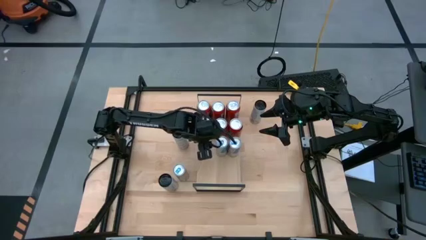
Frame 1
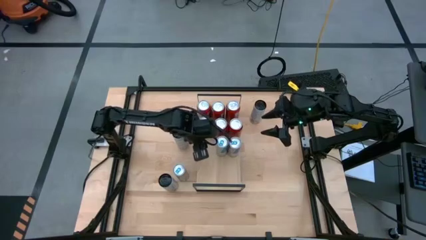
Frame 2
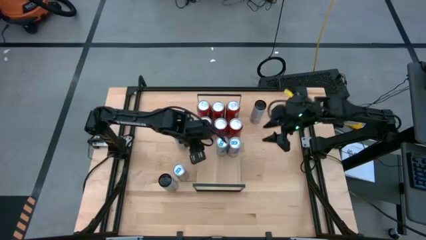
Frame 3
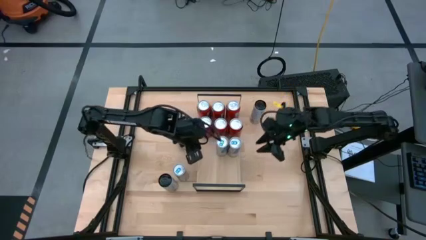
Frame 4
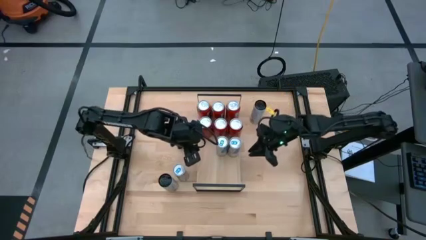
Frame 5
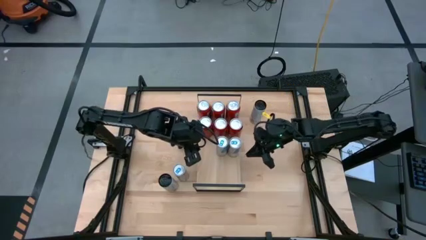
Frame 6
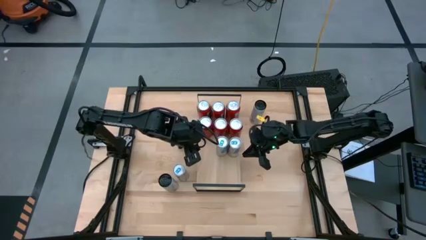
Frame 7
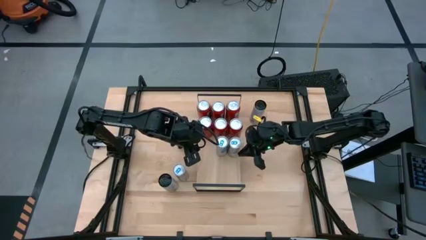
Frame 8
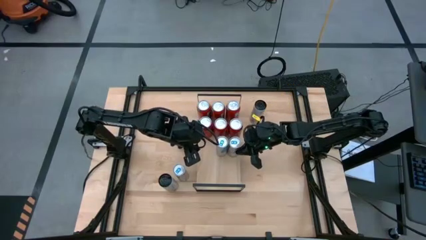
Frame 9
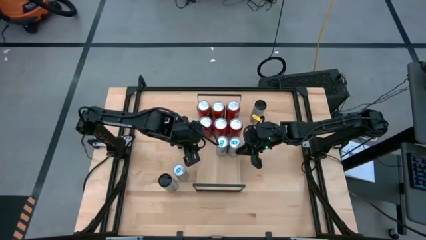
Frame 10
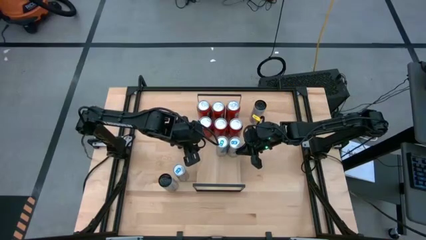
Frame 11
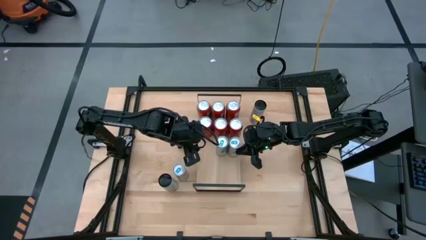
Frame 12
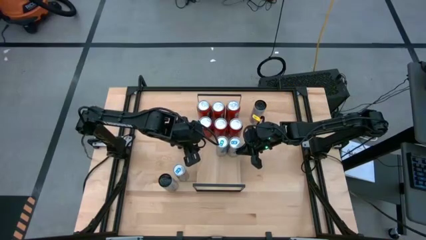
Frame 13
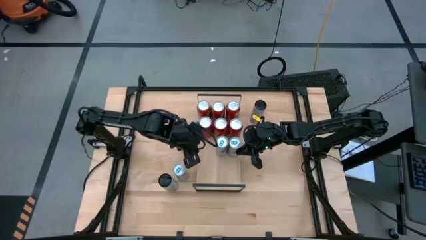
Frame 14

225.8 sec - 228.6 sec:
Task: Place canned beverage on shelf
Adjust the blue soda can on the shelf

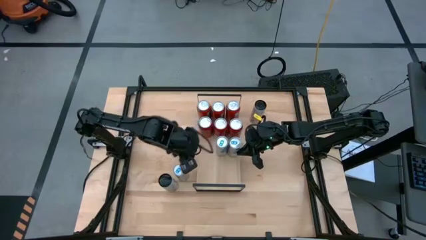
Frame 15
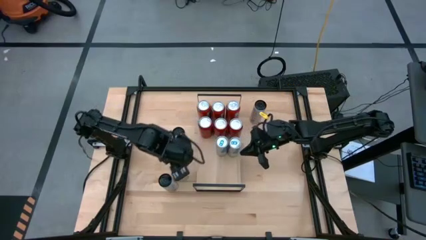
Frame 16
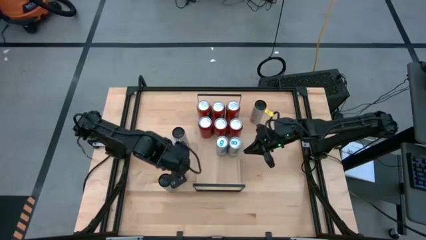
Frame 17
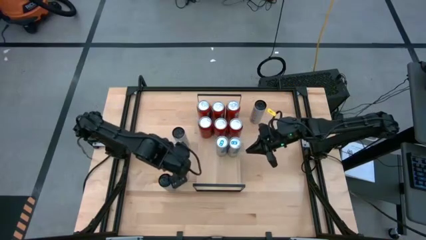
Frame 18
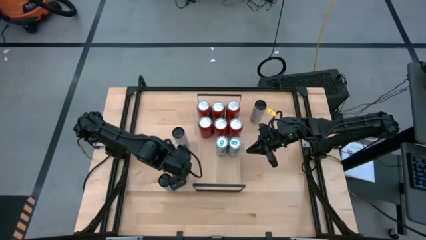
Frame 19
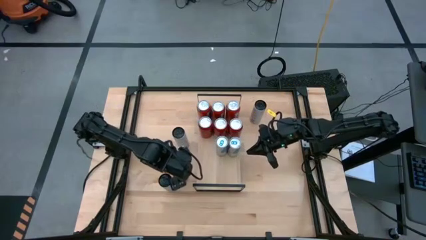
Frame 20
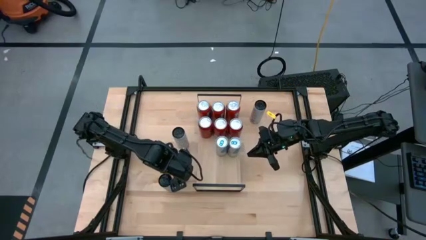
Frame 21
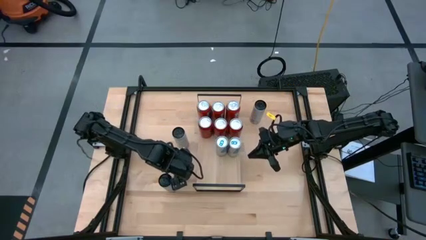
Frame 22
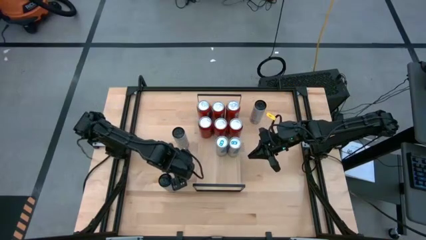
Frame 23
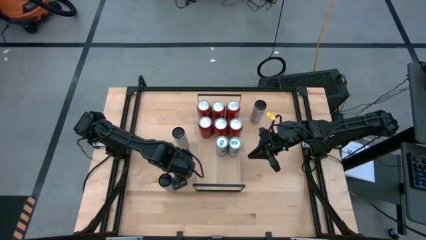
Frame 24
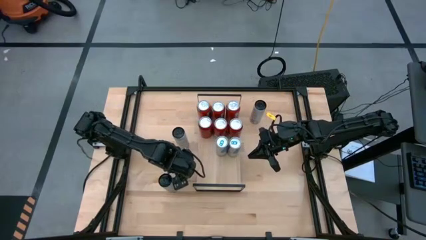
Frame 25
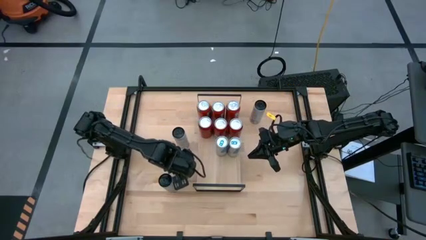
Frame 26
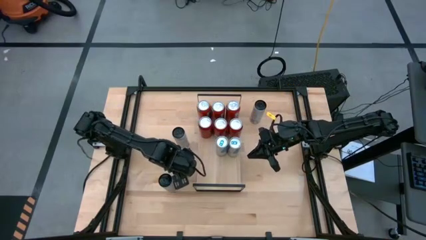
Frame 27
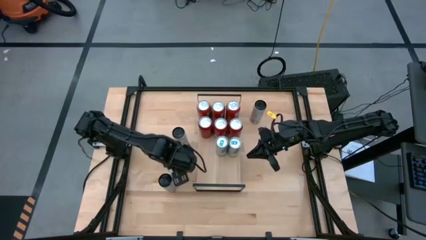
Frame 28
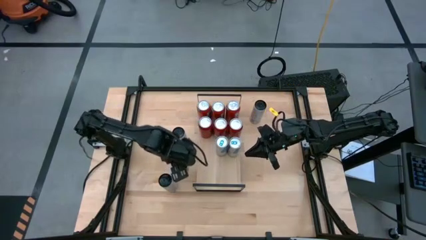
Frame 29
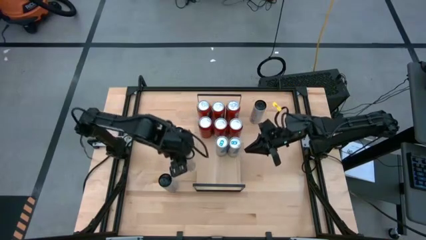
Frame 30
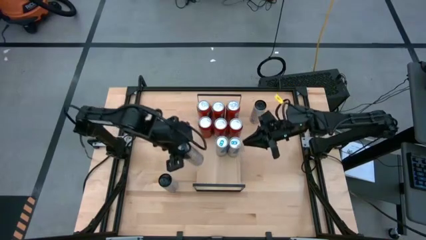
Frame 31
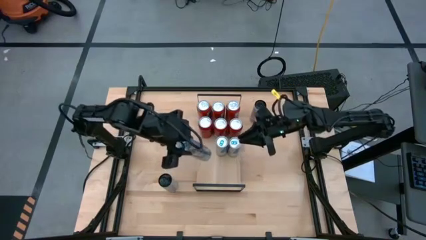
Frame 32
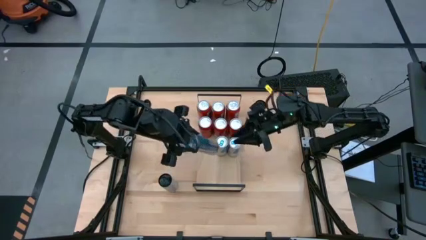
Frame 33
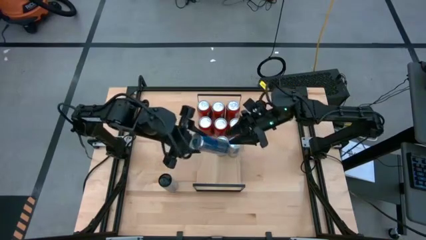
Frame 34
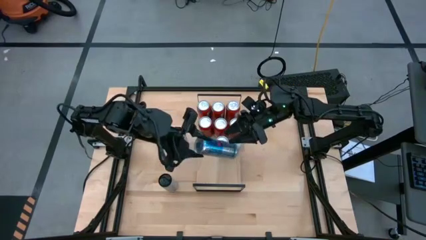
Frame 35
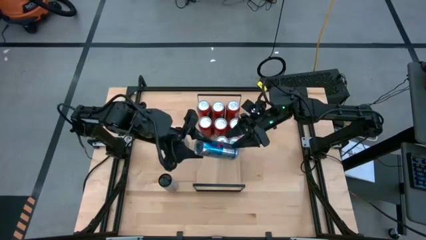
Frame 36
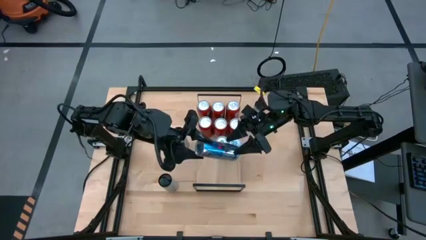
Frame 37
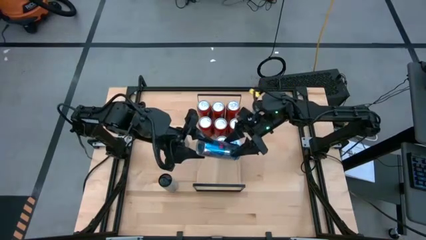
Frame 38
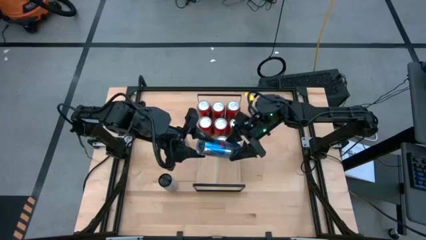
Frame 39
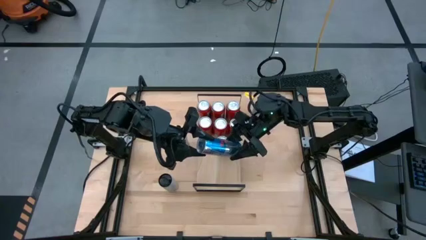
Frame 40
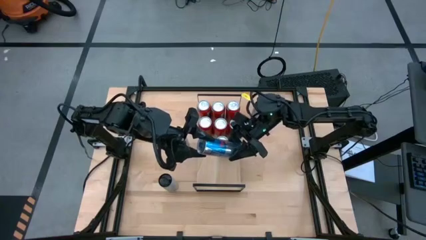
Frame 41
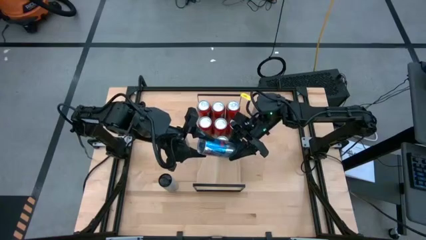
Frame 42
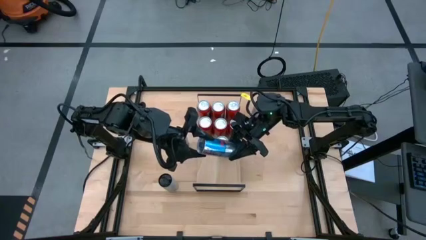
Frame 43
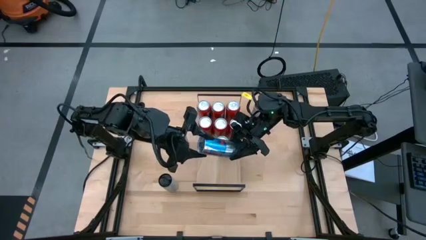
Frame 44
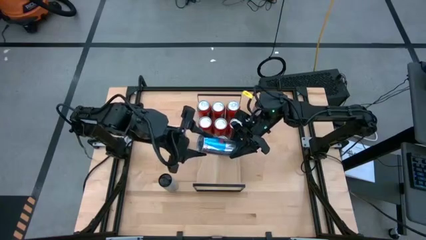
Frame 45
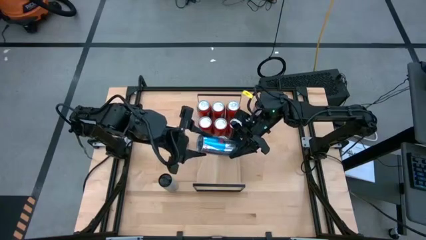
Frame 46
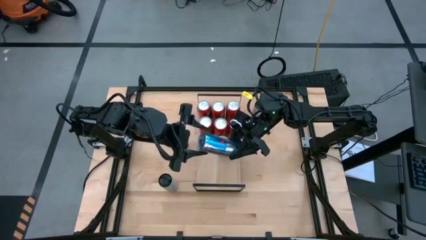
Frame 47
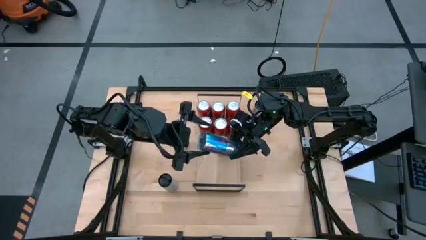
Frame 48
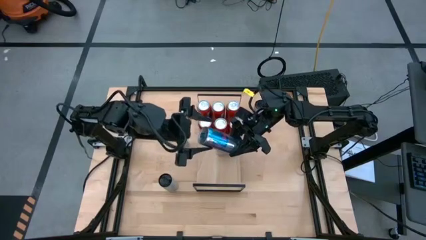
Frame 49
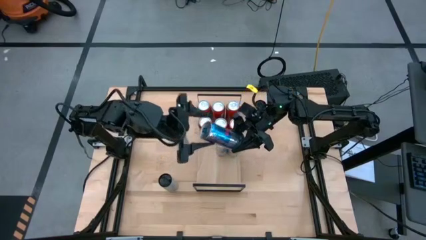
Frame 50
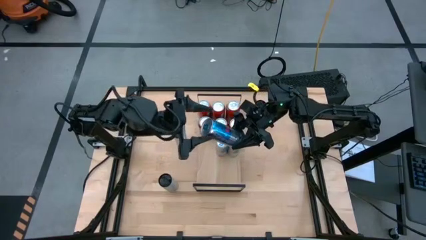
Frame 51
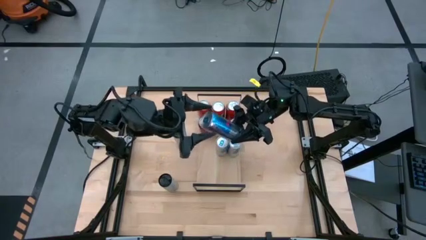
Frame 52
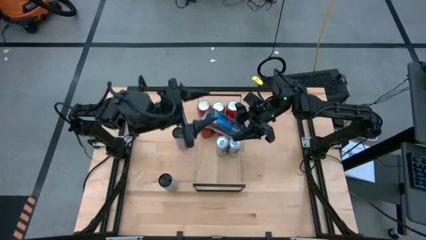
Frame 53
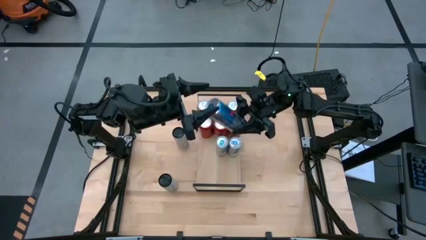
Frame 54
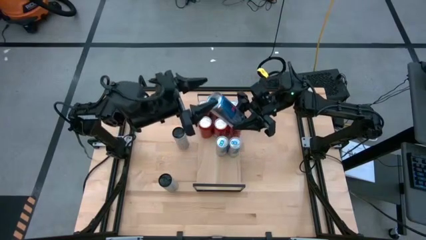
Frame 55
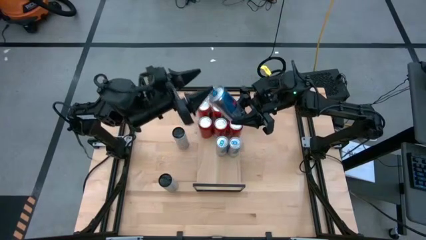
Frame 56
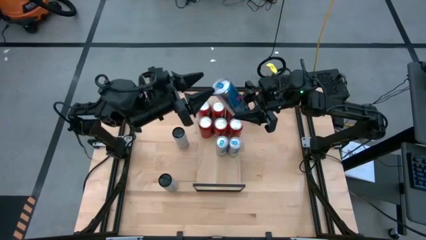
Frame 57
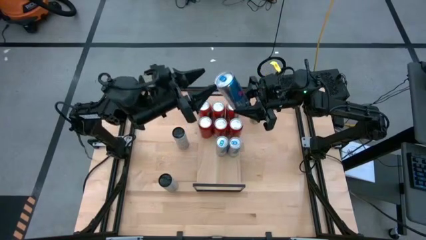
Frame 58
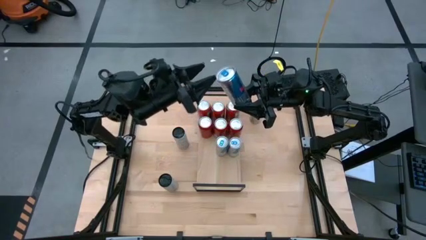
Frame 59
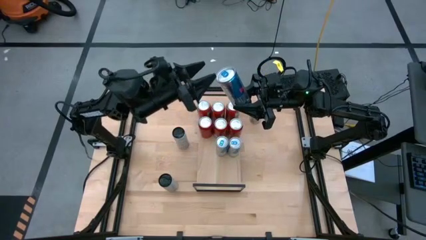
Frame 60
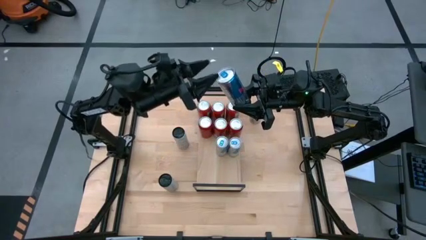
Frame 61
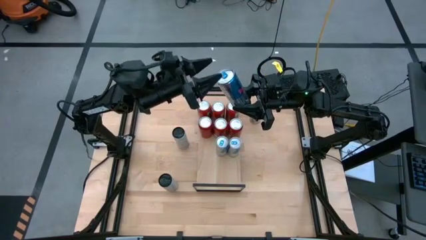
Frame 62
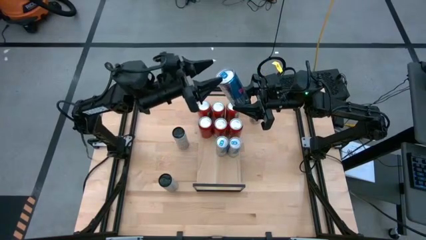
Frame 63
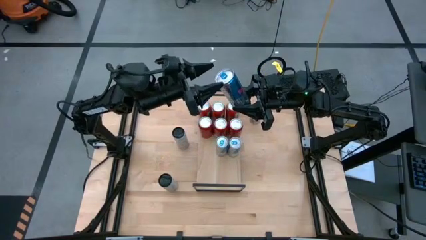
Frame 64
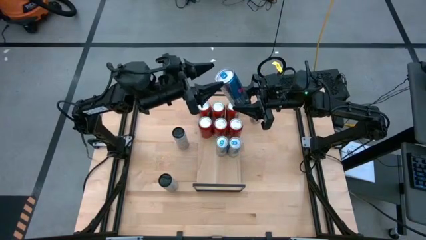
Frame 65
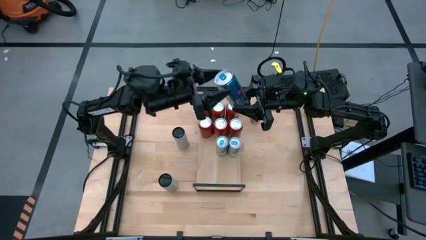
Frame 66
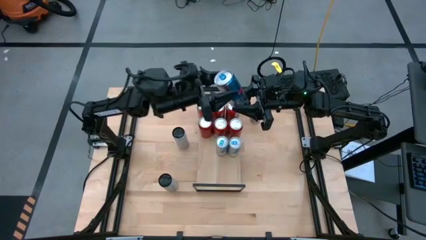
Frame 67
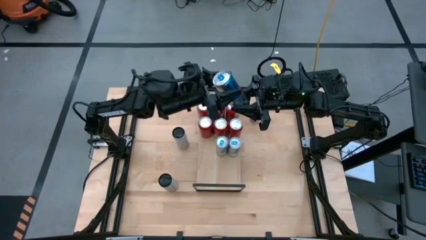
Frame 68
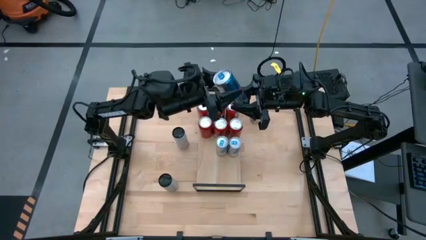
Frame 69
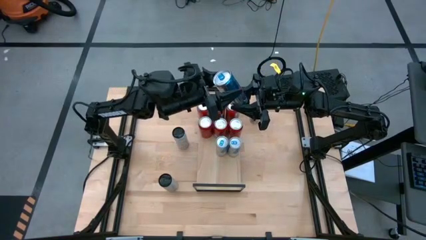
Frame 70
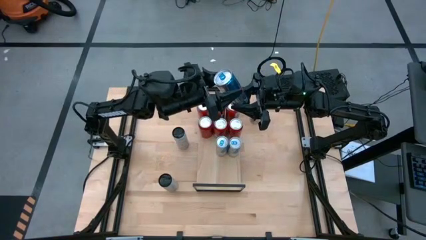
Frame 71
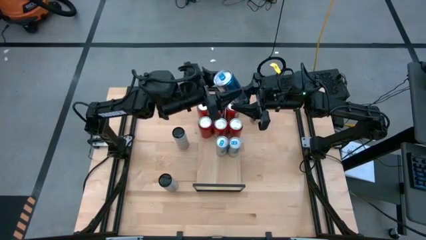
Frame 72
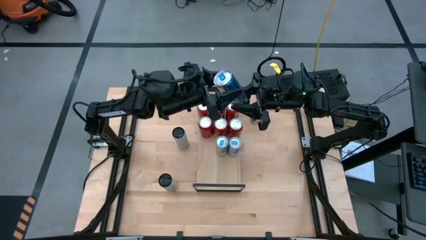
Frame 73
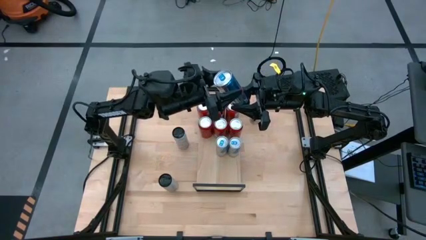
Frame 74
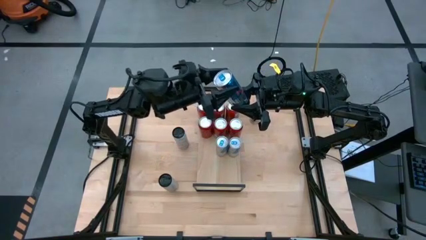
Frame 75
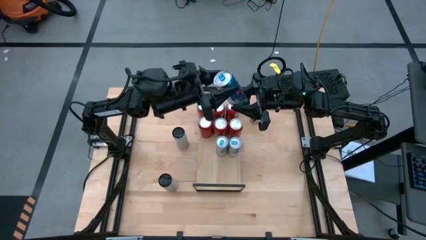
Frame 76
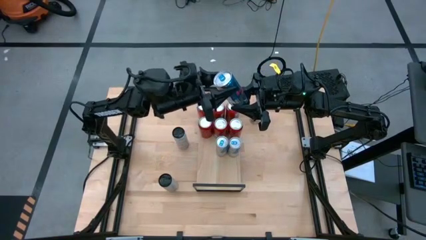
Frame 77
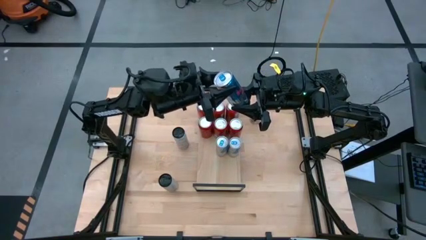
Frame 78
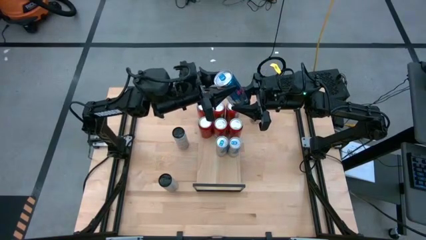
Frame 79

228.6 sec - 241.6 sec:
Put the blue soda can on the shelf aligned with the other blue soda can

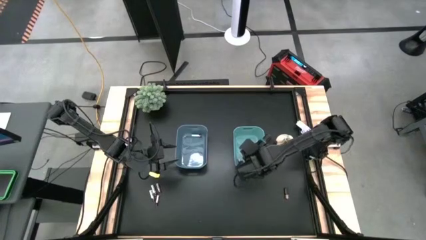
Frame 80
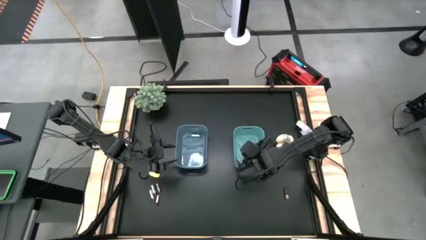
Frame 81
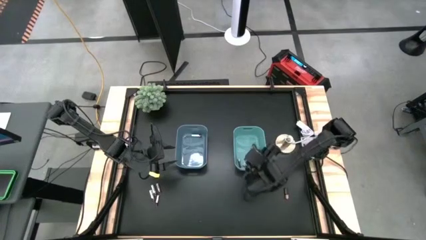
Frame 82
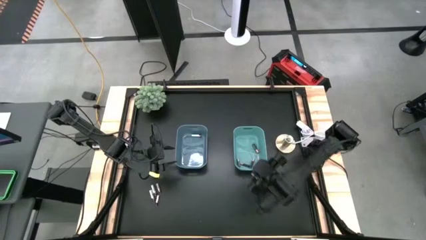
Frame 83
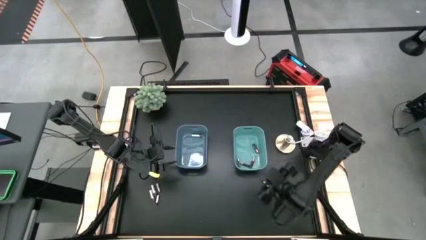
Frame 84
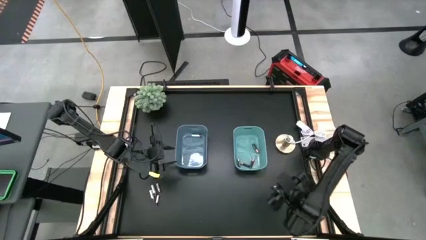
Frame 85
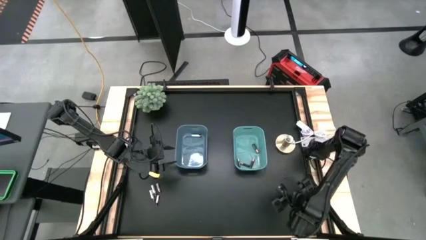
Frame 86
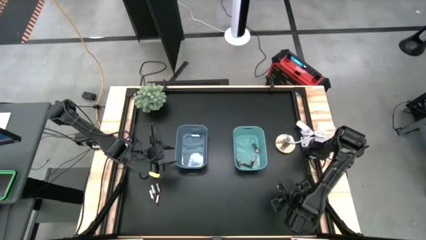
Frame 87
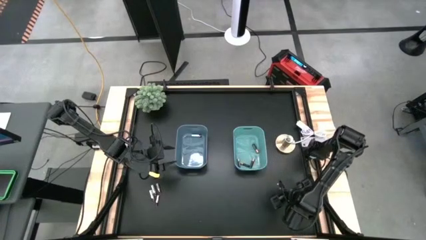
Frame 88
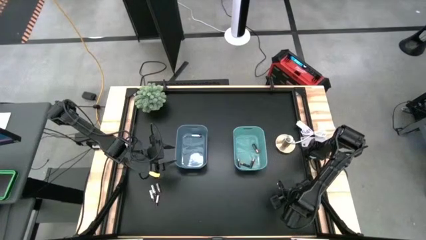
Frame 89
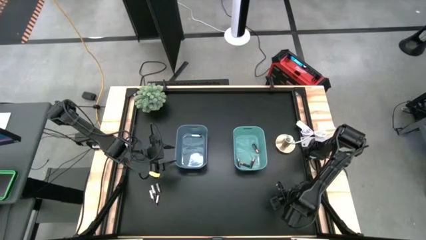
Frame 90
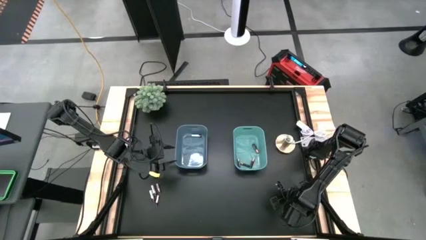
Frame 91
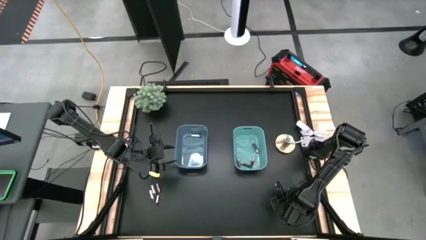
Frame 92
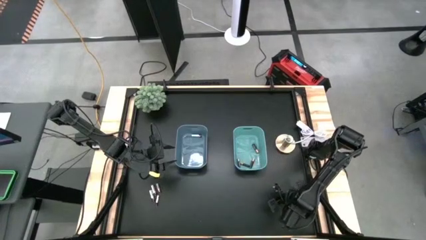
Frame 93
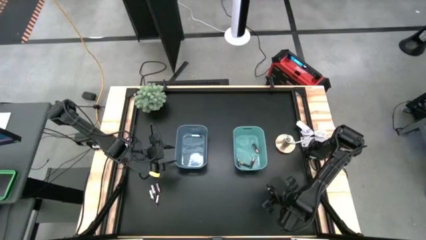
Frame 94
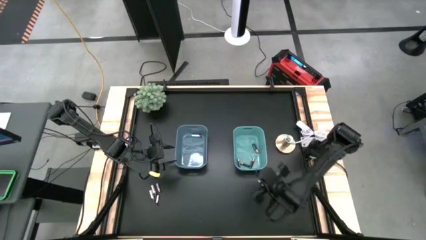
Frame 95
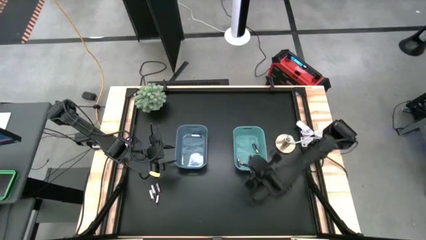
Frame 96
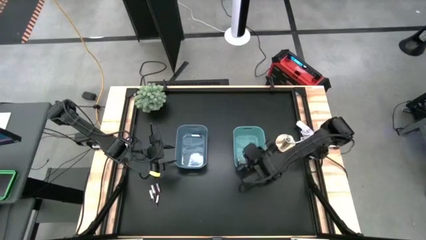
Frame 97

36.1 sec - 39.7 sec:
Task: Sort batteries
Put the big black battery into the green bin
